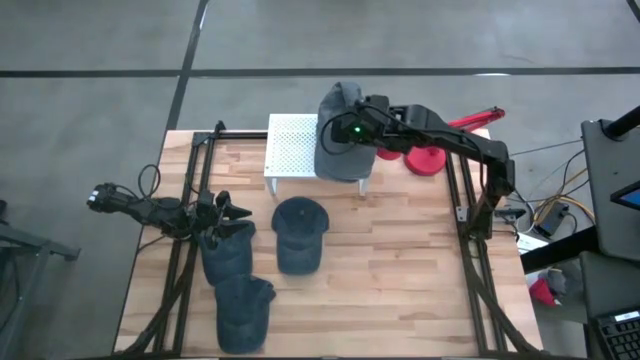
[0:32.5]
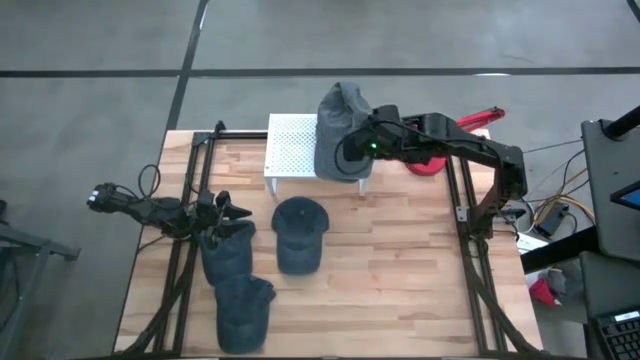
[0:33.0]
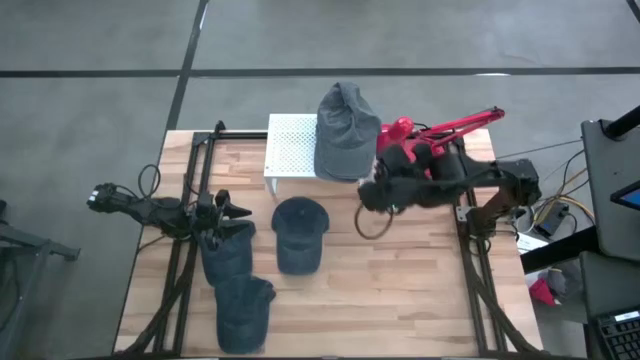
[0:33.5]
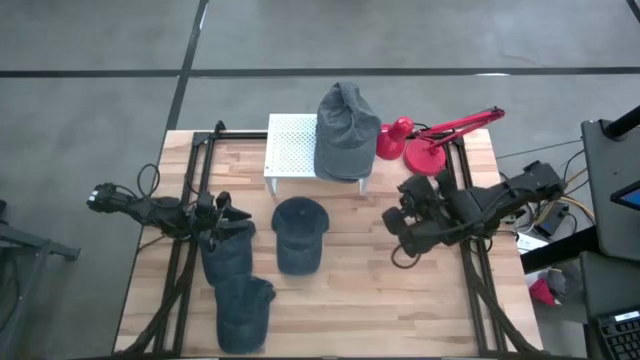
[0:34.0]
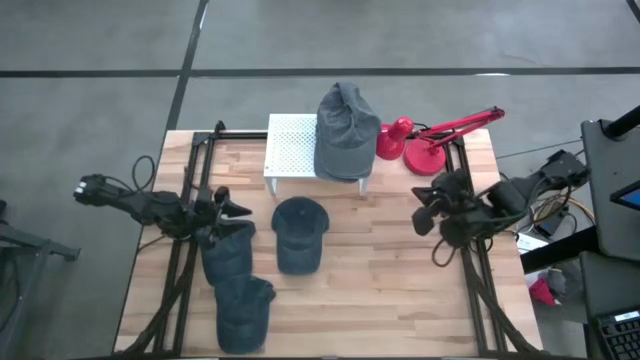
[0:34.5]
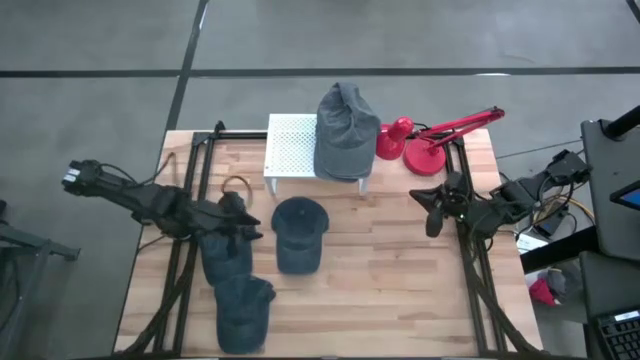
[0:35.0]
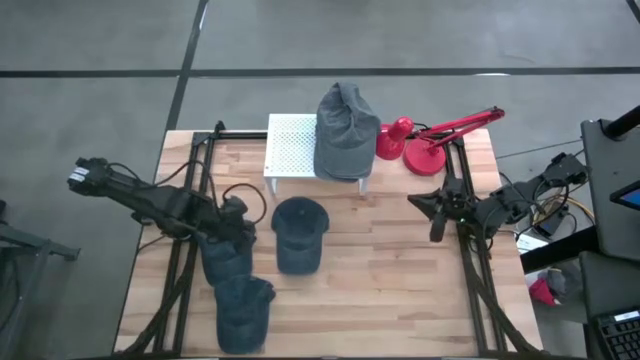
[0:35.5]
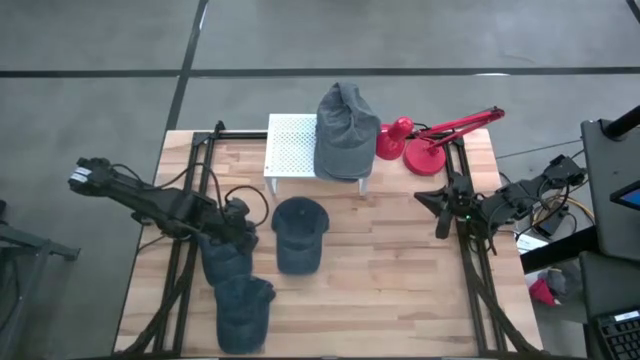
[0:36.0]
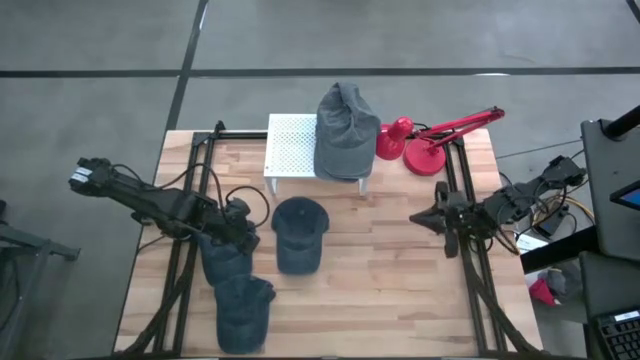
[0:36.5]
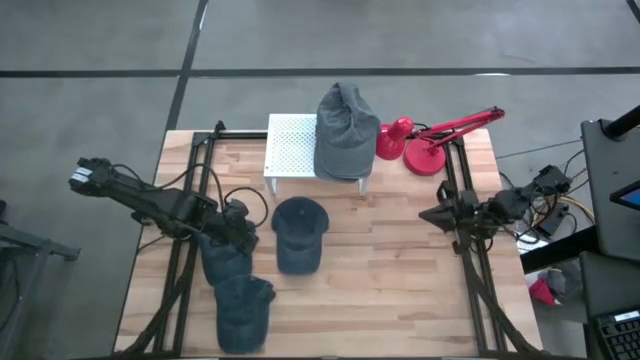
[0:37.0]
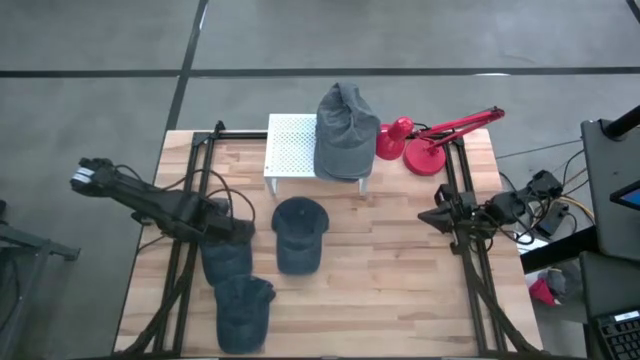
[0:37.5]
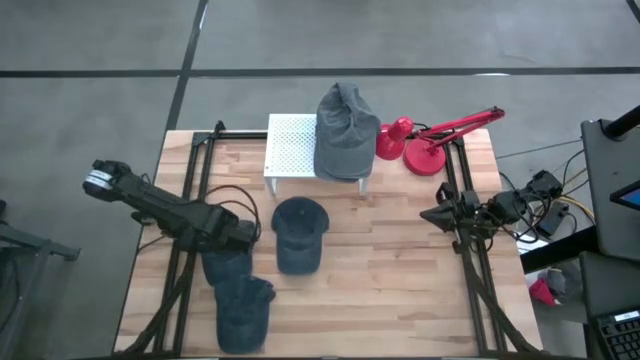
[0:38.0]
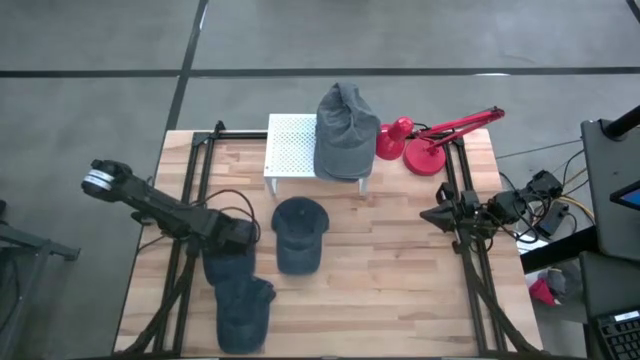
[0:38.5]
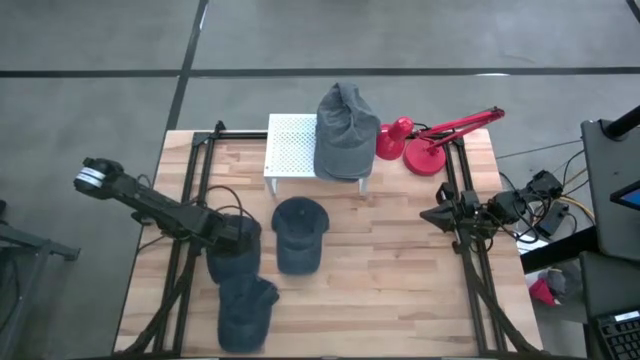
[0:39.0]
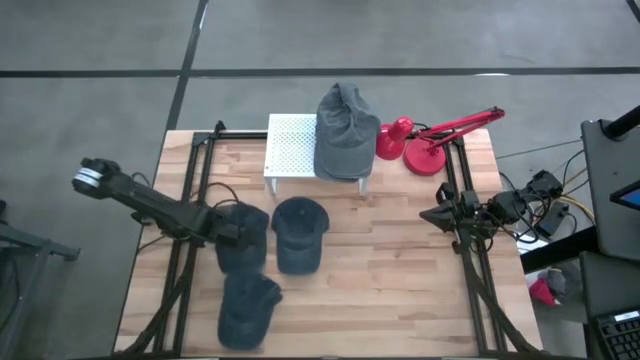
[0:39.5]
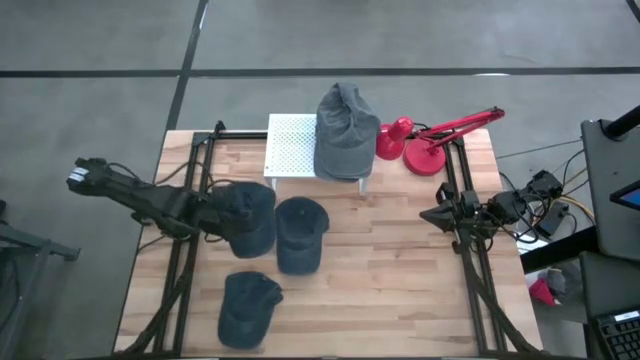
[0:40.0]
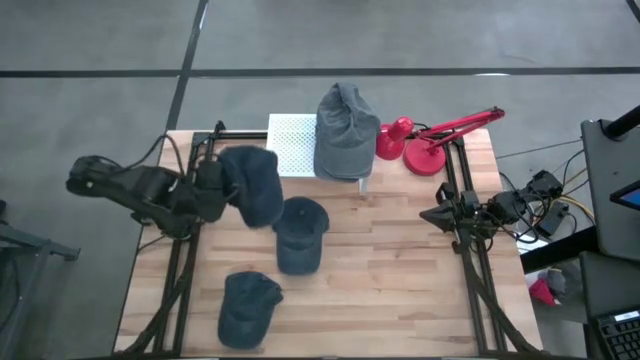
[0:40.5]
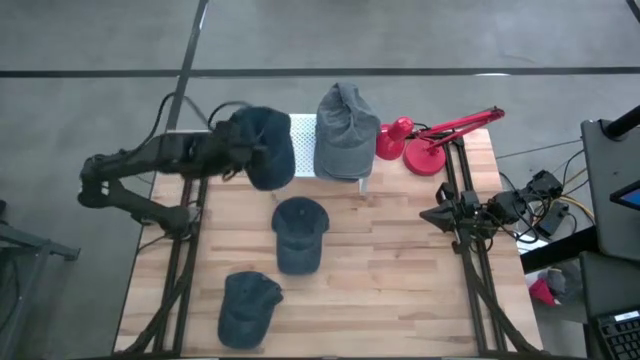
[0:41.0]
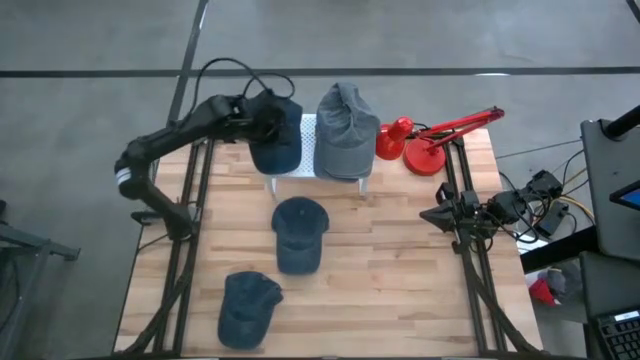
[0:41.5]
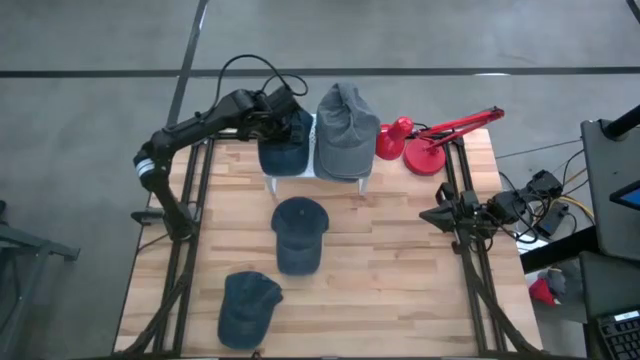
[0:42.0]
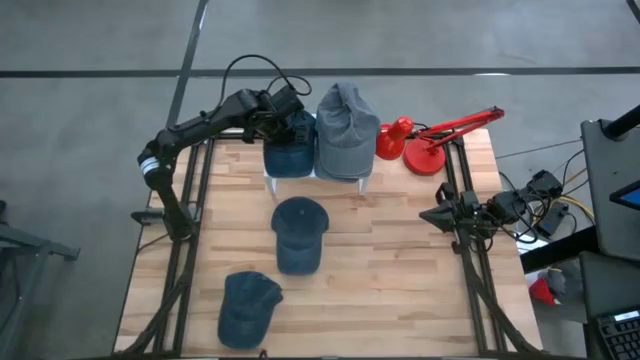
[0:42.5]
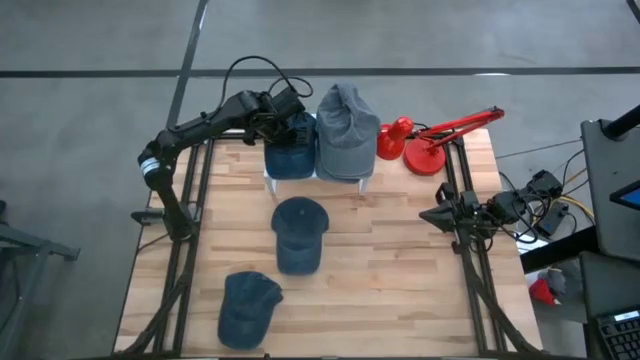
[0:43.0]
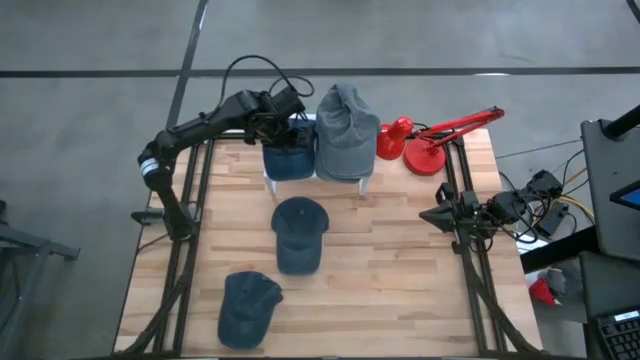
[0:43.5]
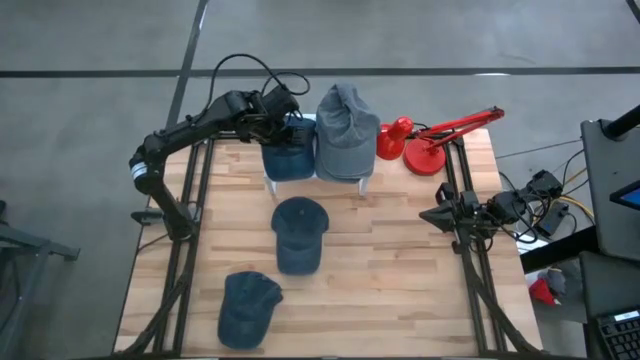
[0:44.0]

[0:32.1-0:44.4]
Task: Pick & Place hat
Put the blue cap on the shelf

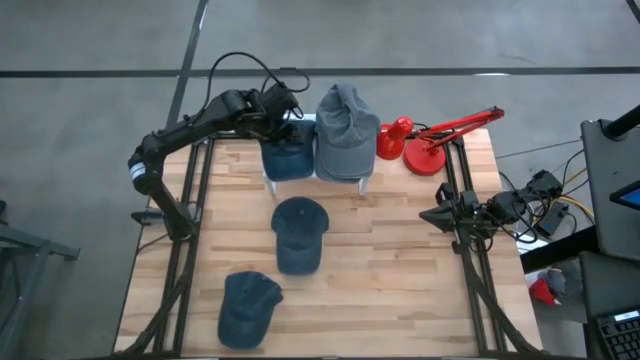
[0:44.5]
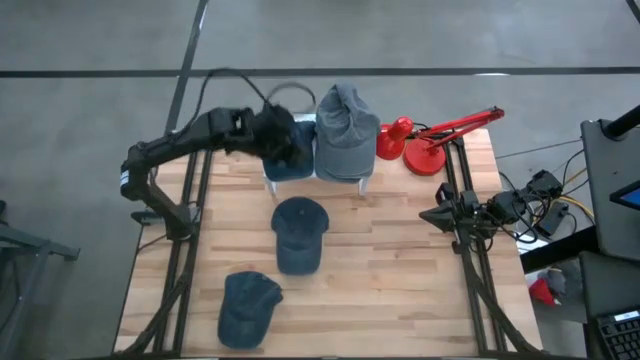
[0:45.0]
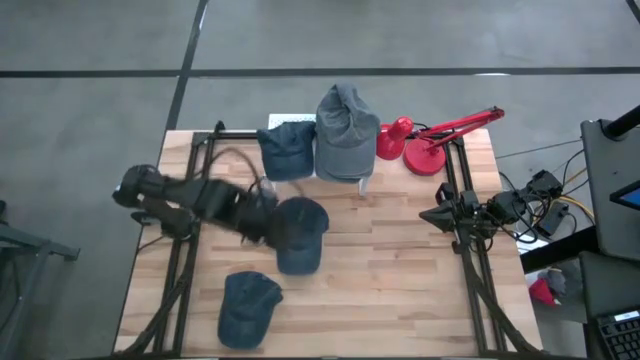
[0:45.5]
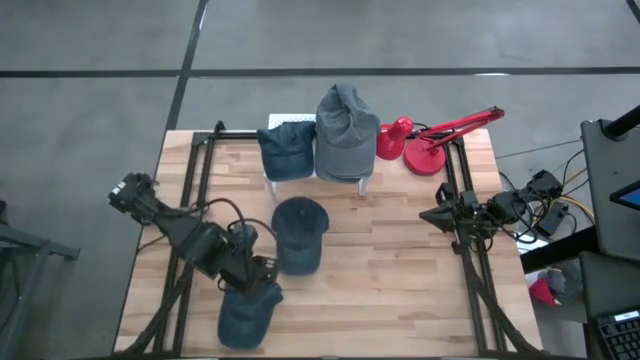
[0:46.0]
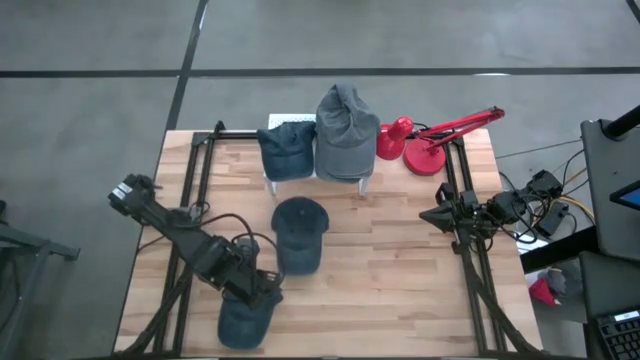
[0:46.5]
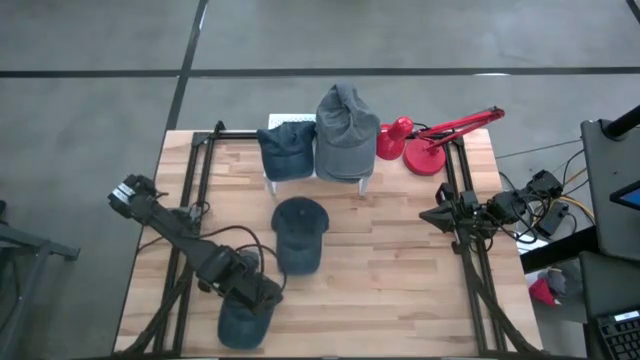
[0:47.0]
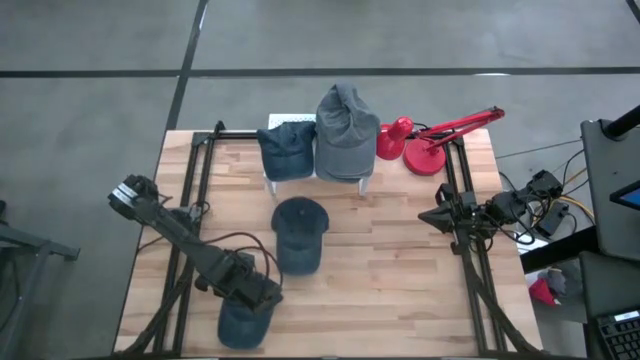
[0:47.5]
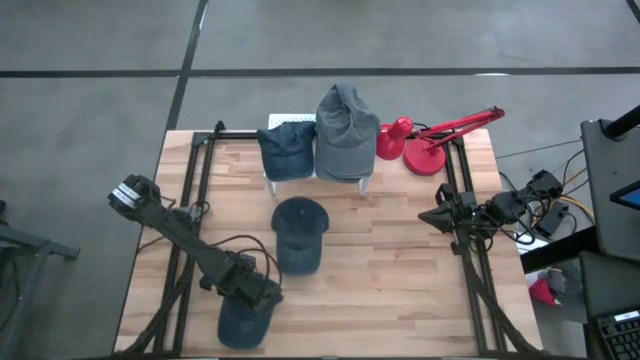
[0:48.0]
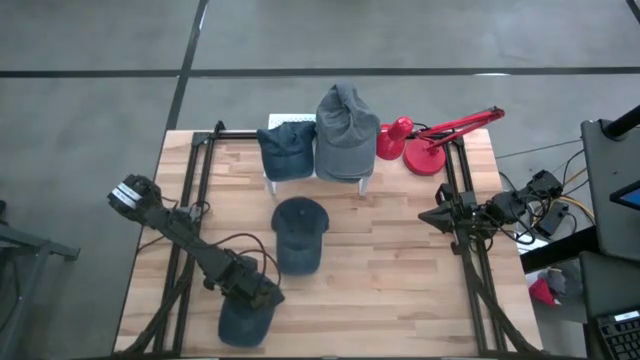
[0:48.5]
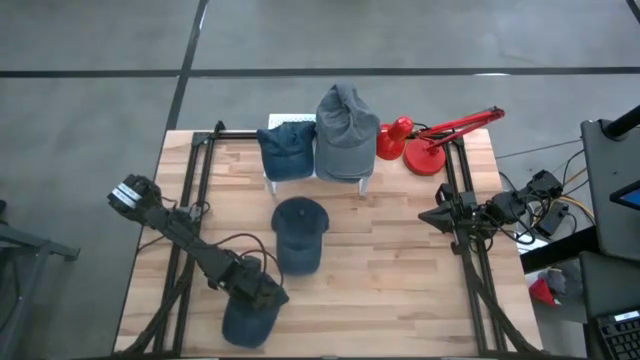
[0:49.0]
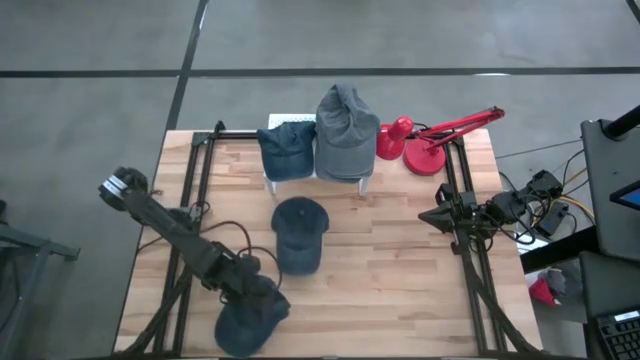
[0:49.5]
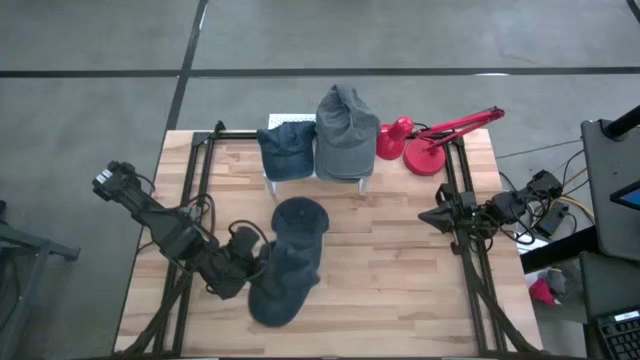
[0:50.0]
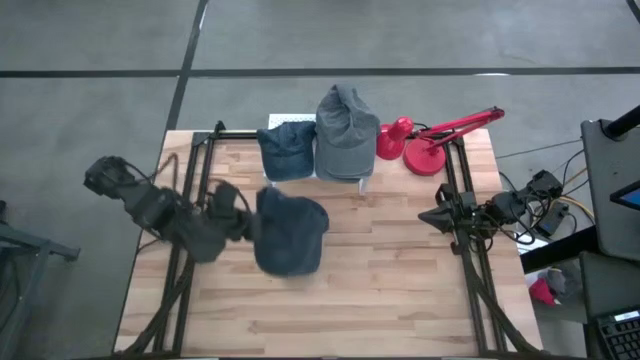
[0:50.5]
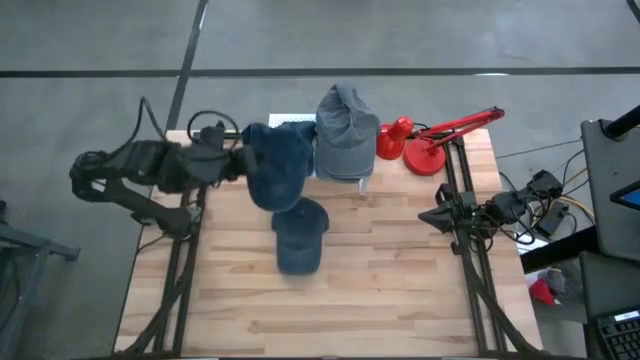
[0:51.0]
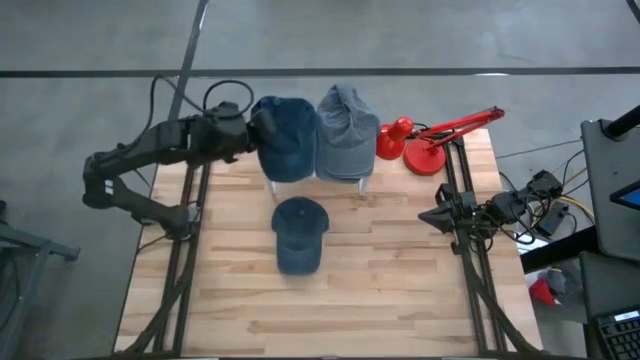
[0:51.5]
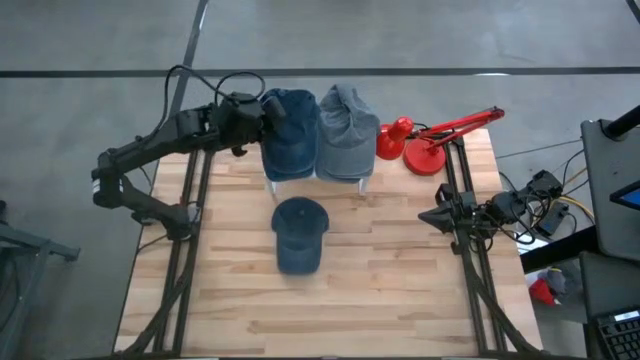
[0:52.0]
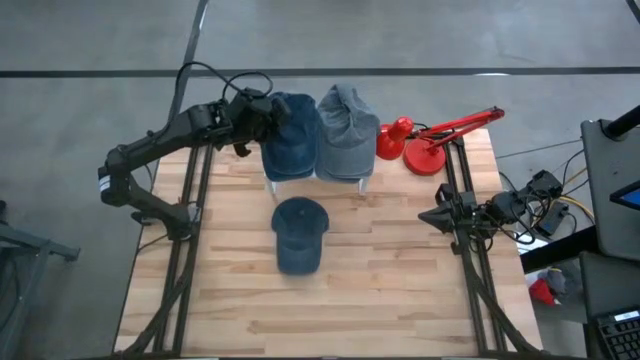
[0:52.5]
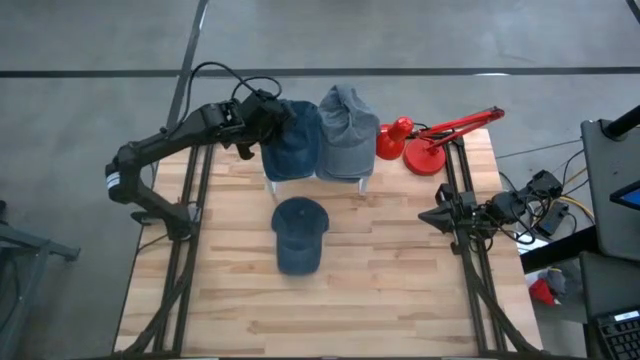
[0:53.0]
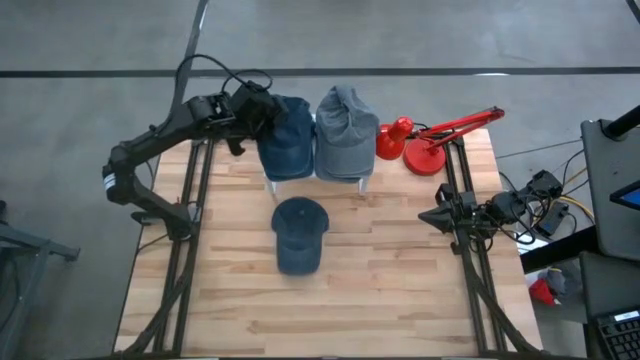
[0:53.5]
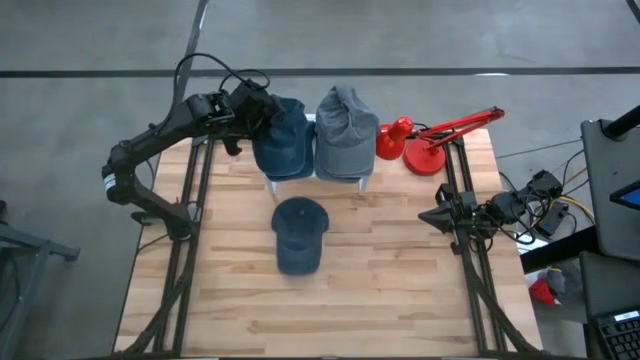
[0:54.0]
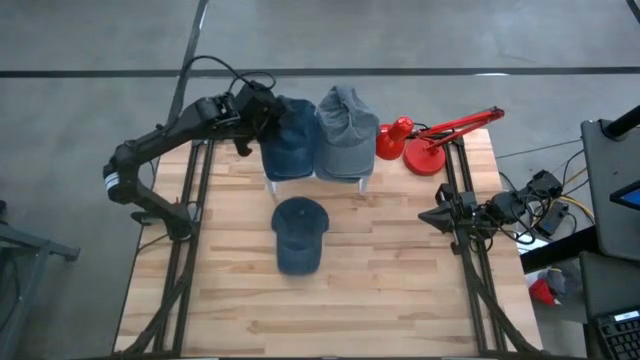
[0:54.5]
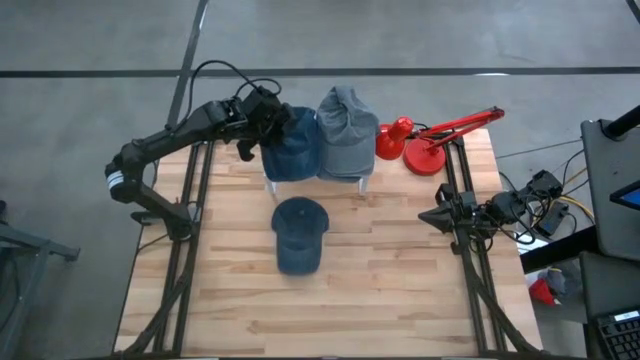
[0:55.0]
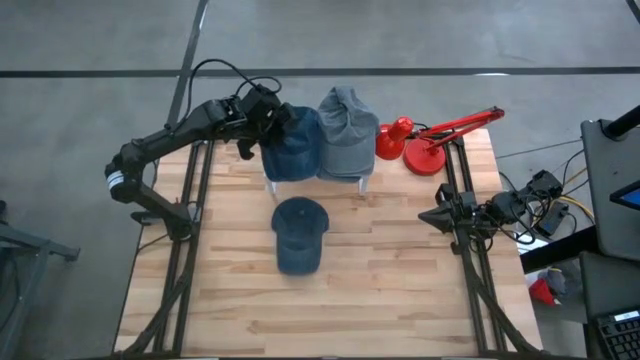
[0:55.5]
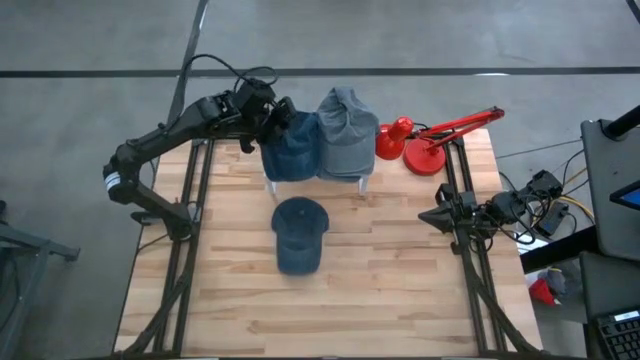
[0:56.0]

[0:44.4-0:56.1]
Put the blue cap on top of the blue cap on the shelf
